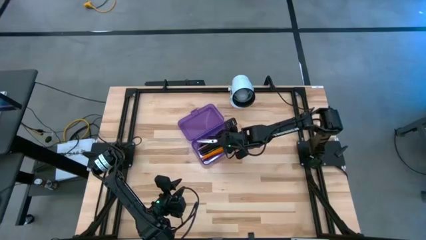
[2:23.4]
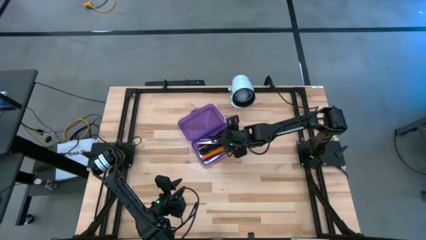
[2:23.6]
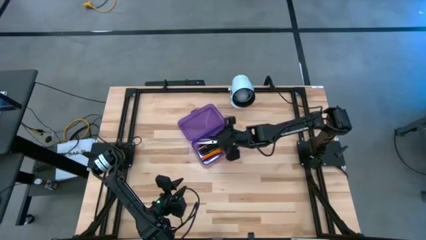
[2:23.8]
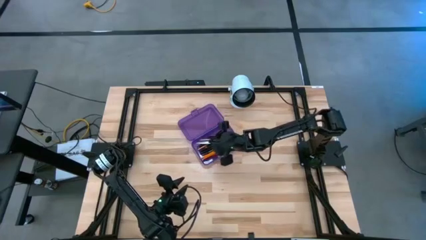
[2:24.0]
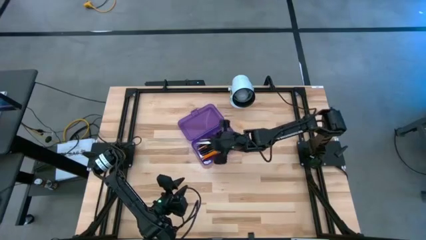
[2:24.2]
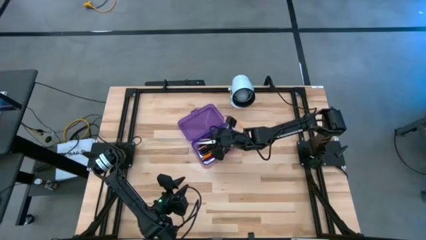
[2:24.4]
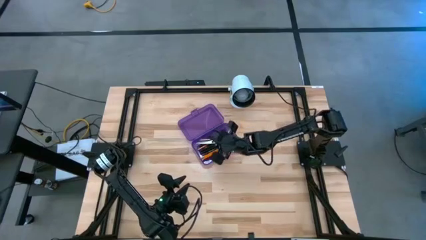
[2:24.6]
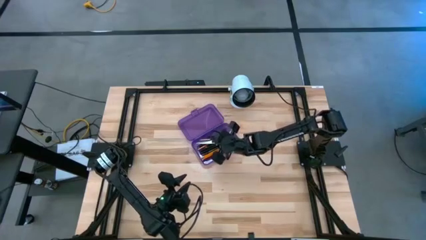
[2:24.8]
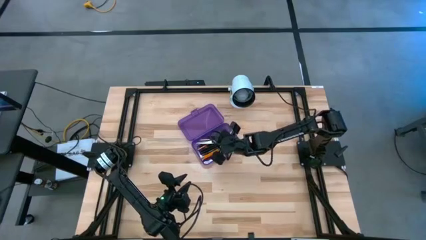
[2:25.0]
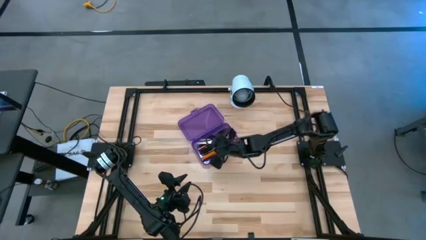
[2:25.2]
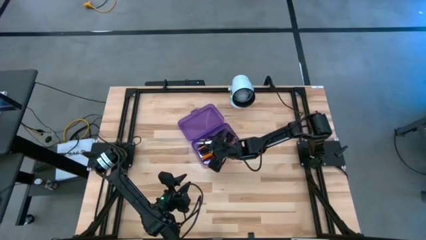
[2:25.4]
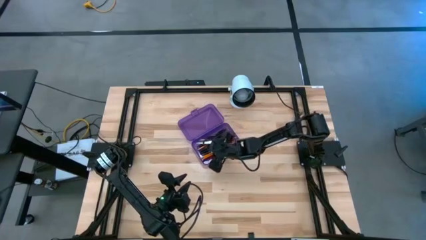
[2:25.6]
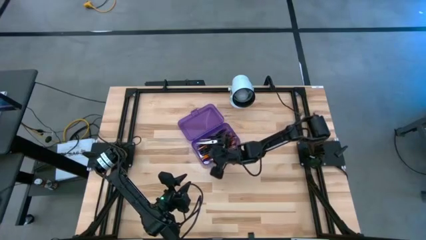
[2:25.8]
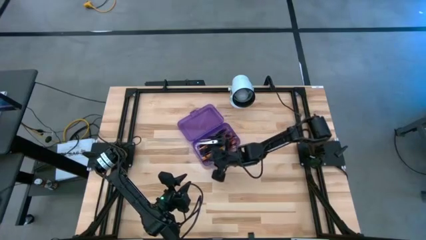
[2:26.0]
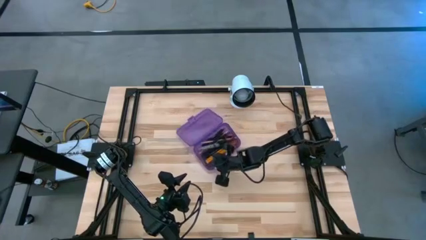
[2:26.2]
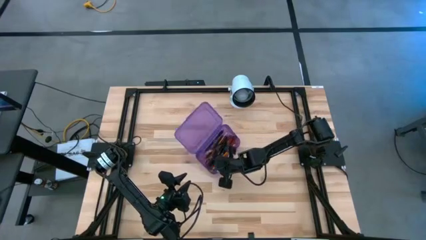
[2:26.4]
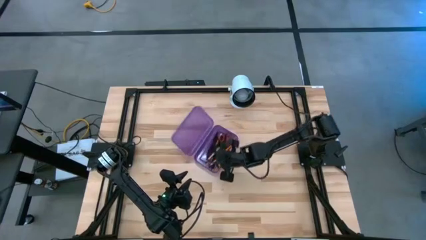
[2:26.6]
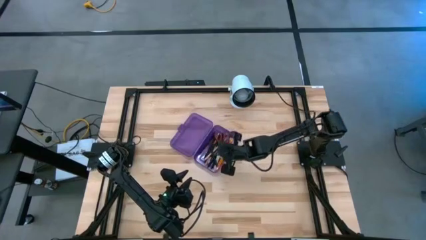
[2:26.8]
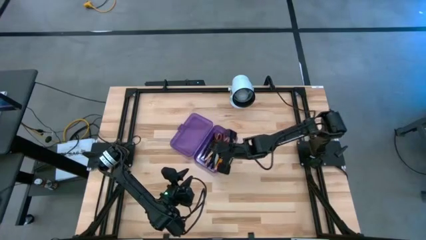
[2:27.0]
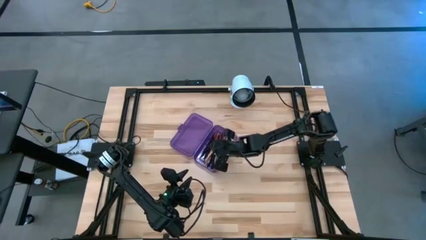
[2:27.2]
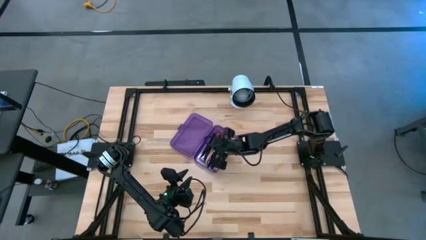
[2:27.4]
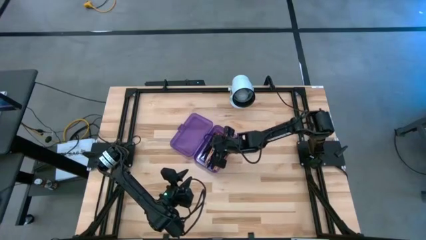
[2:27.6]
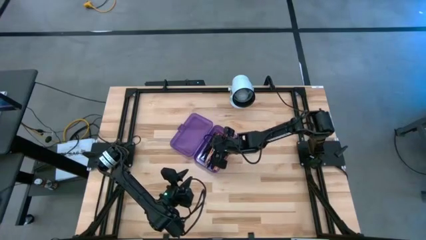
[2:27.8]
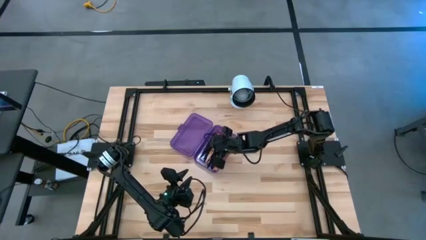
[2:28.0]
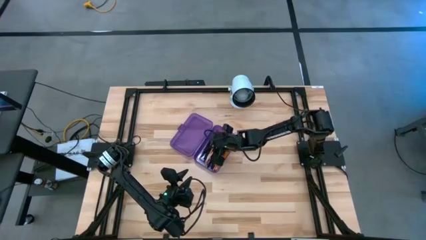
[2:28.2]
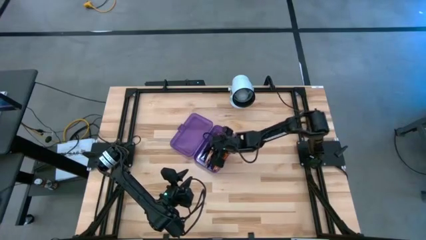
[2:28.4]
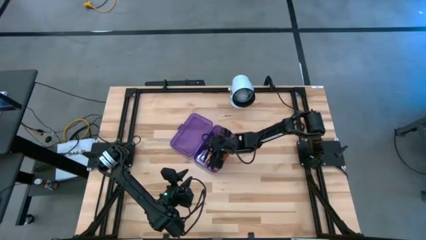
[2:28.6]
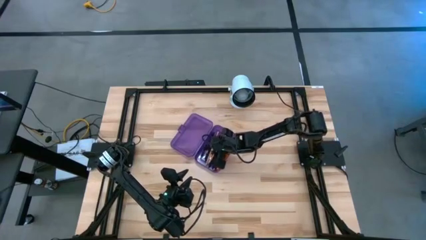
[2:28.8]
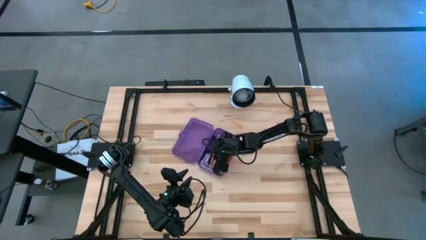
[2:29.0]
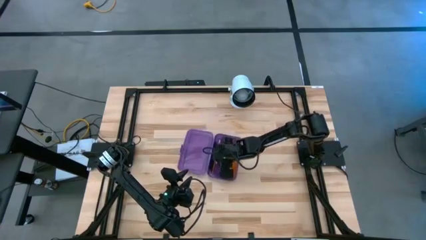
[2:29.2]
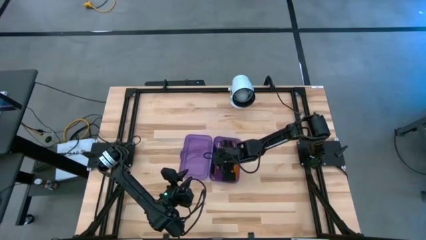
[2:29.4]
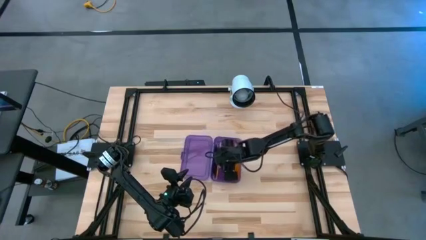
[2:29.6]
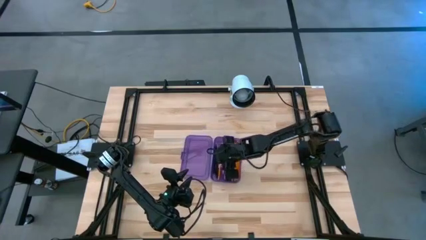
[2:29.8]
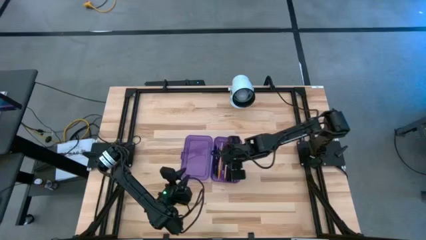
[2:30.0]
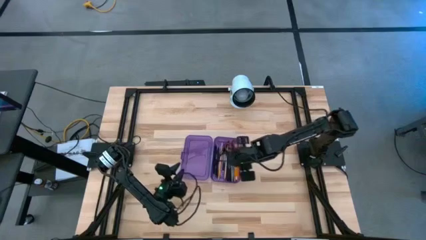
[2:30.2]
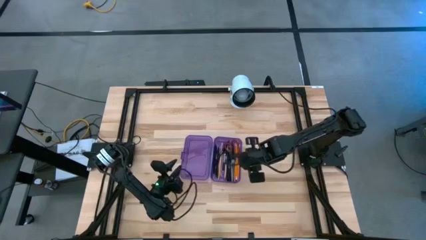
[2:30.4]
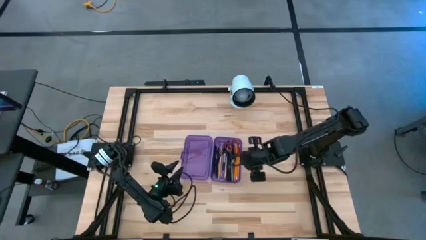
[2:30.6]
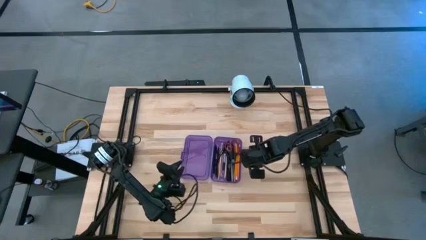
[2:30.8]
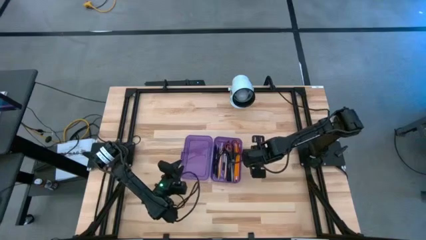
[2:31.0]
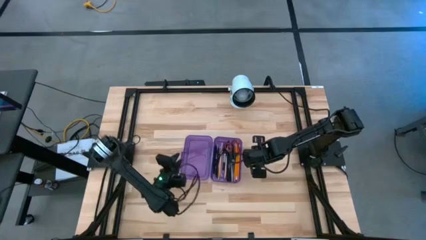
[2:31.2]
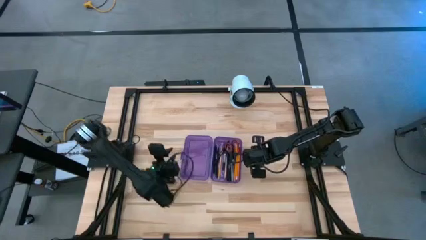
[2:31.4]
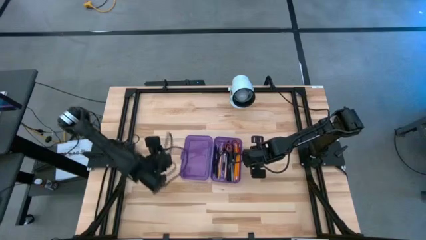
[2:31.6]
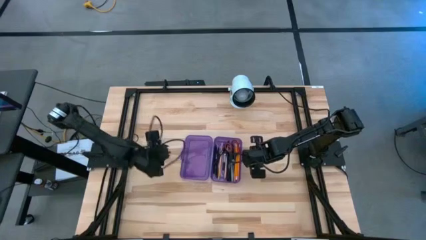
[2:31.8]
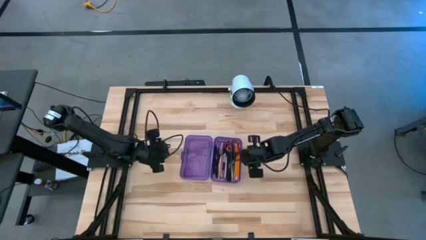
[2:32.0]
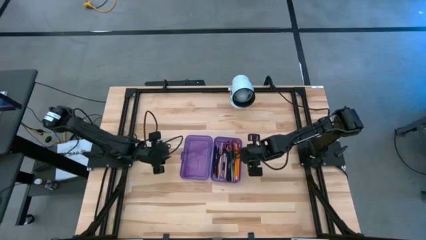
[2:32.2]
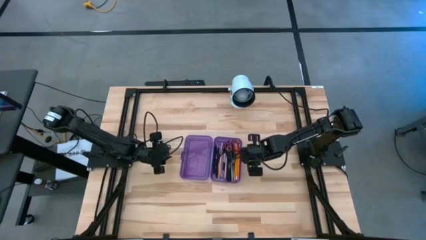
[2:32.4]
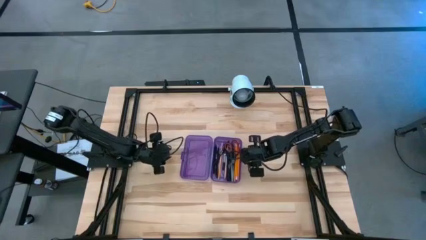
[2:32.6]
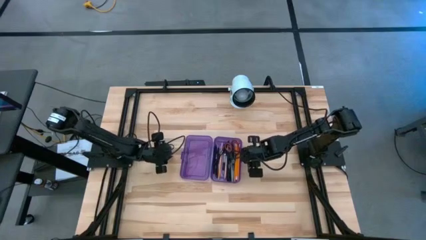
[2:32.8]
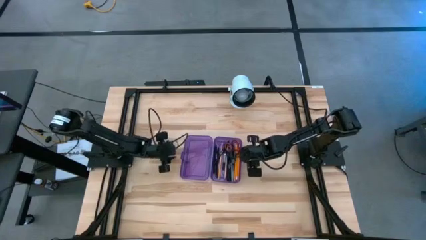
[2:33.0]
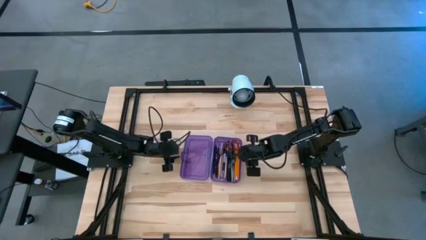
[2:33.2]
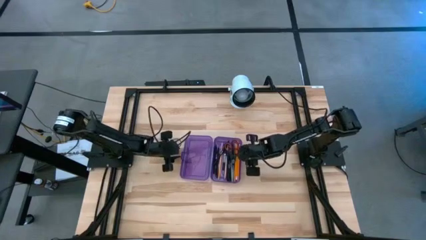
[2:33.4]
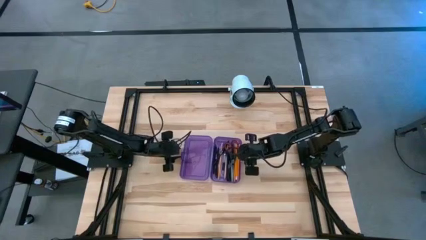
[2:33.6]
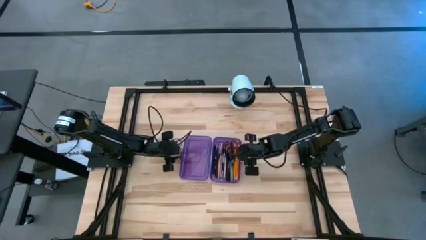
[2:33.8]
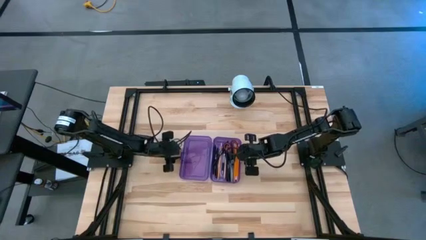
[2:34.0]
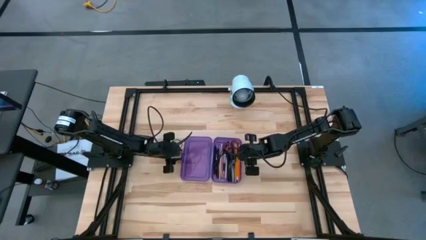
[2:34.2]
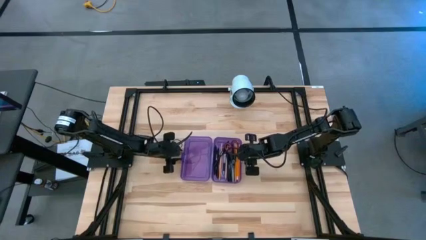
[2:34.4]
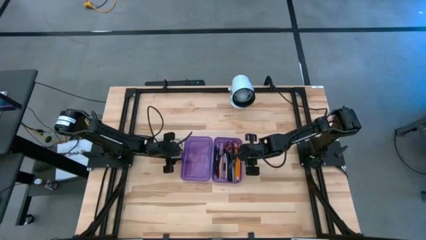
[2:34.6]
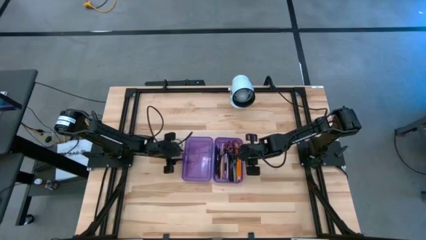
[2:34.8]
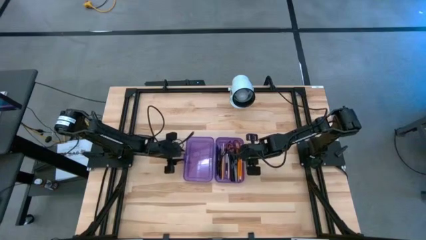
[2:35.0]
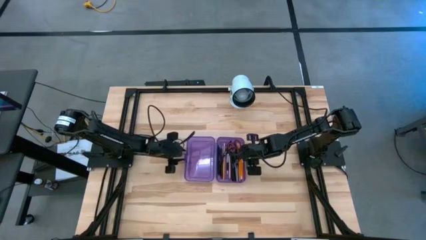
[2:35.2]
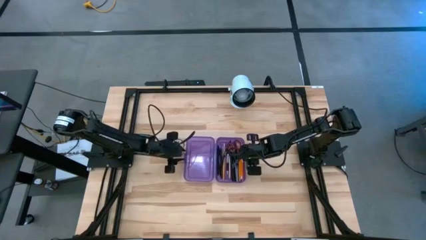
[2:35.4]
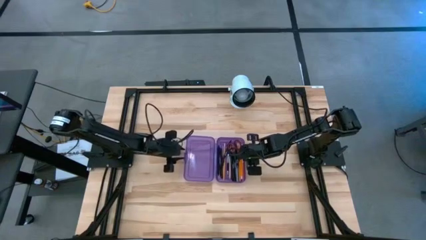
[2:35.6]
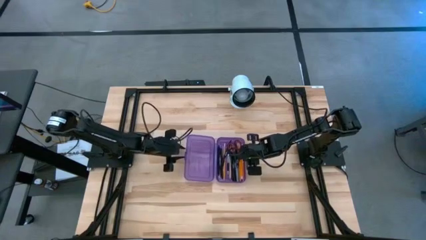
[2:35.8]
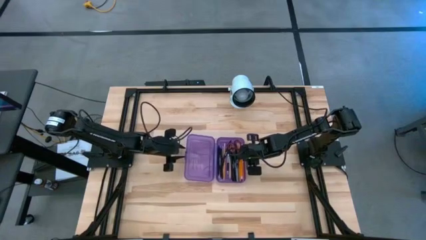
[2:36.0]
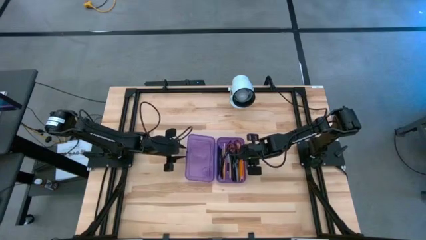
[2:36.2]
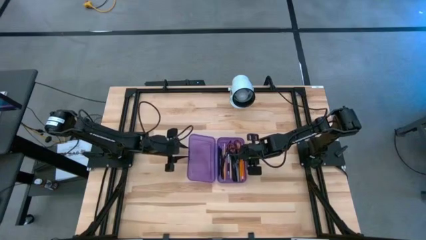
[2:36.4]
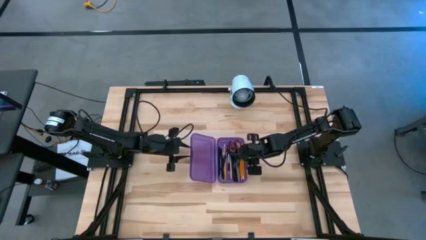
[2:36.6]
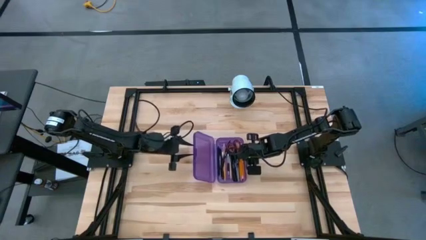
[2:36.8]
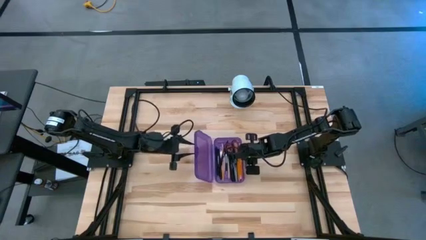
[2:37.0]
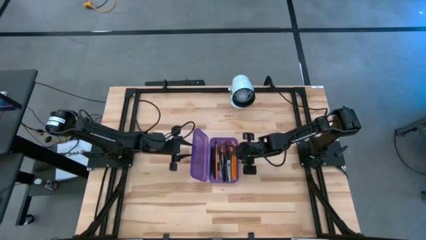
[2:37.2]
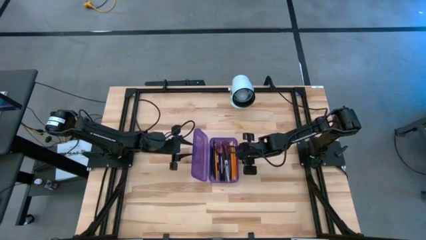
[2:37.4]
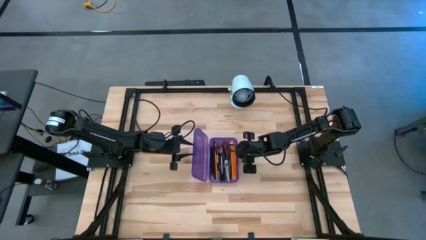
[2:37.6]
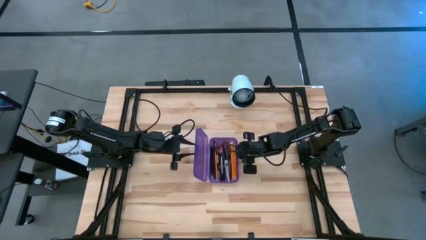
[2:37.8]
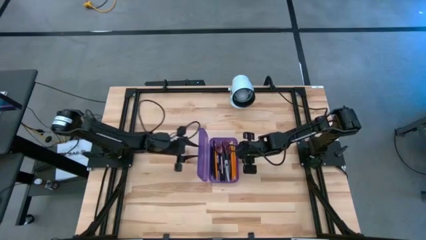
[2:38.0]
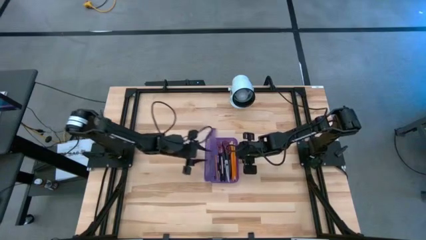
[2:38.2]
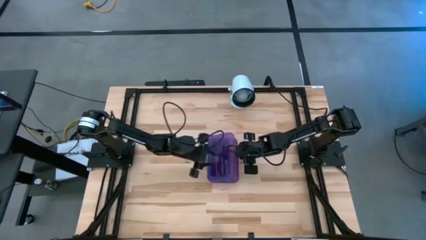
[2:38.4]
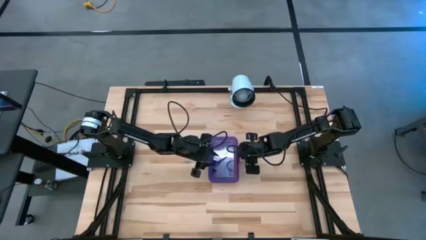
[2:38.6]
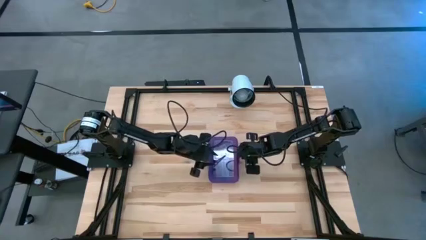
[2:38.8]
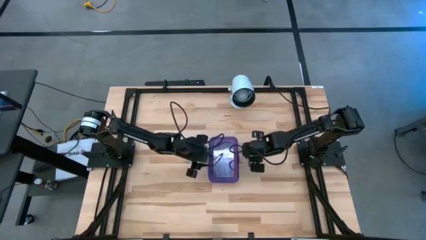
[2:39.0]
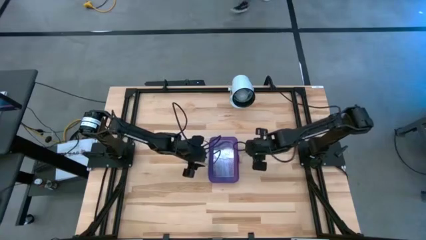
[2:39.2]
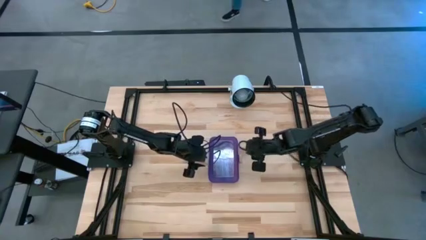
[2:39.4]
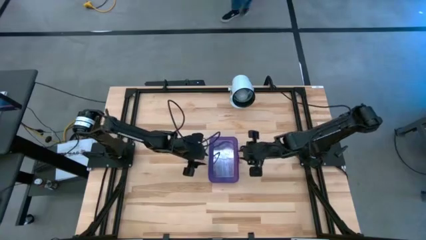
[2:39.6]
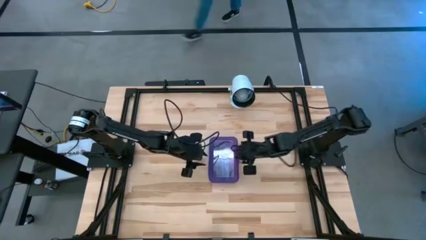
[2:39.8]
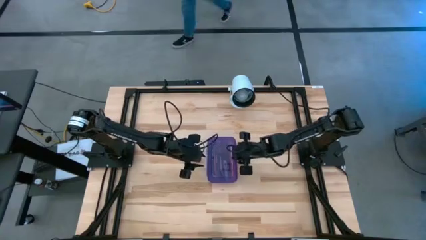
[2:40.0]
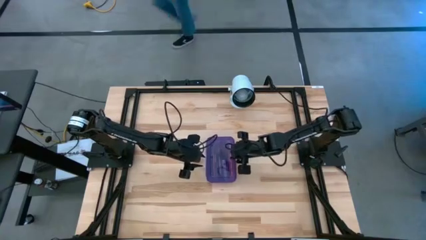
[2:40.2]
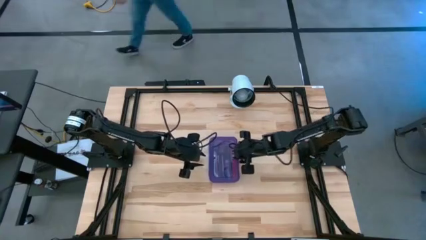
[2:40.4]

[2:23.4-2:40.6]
Task: Pick & place school supplies into a supply box
Close the purple supply box
